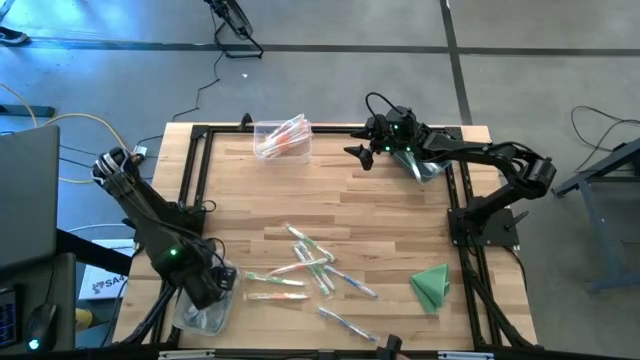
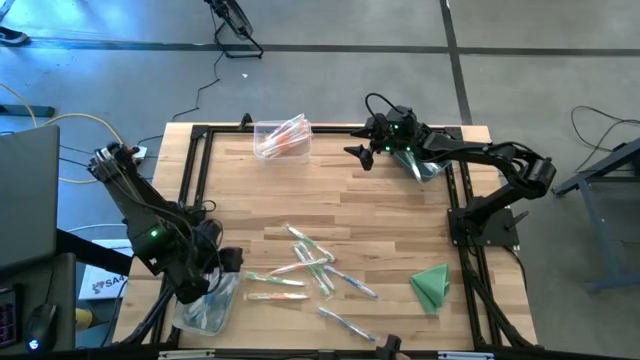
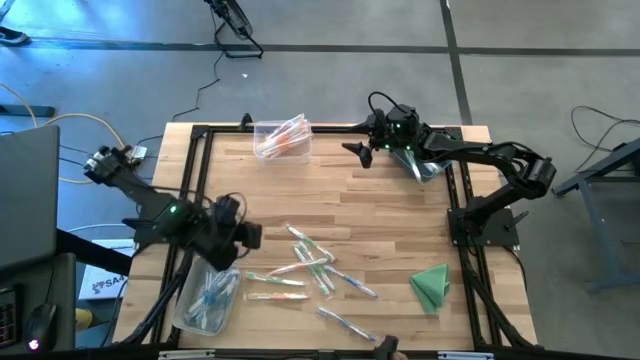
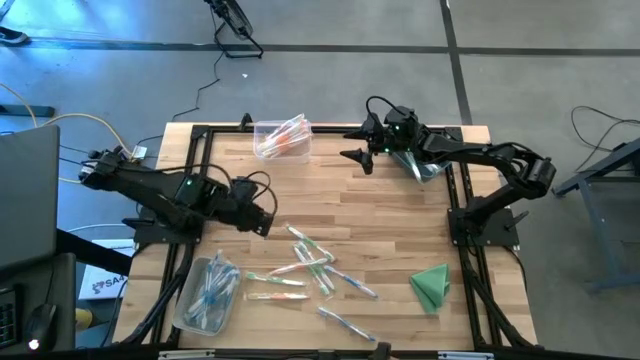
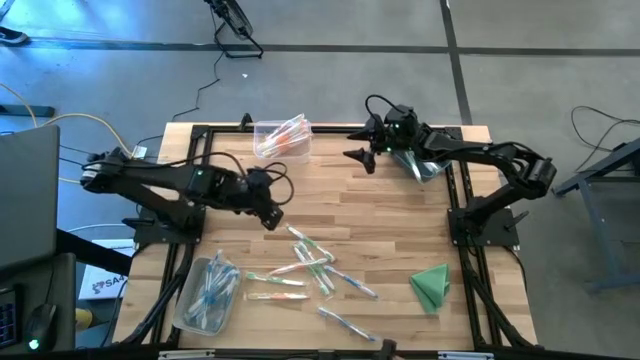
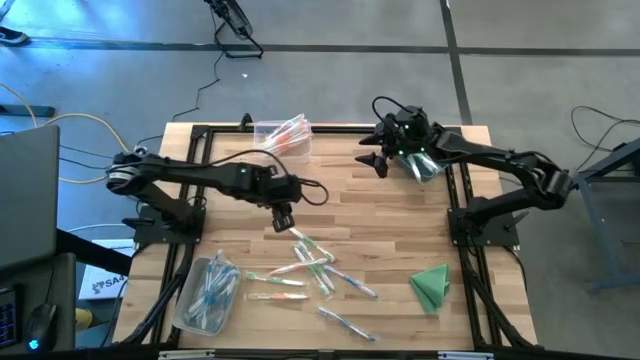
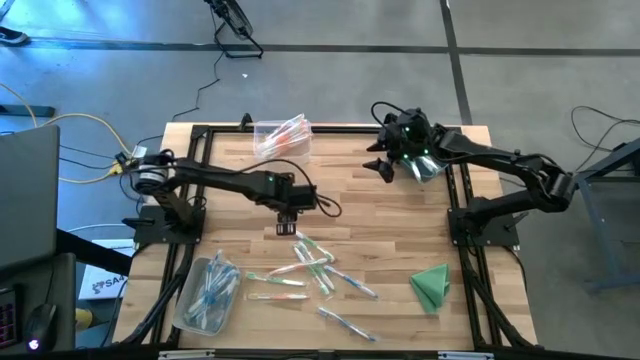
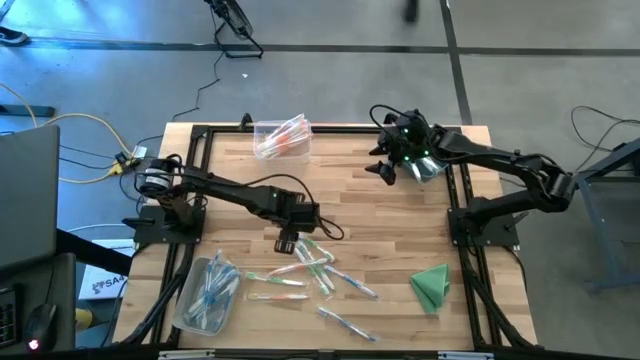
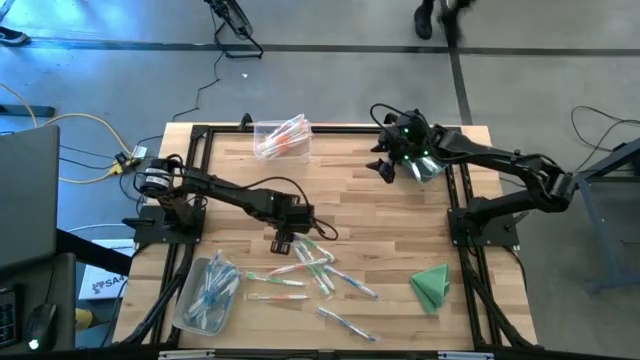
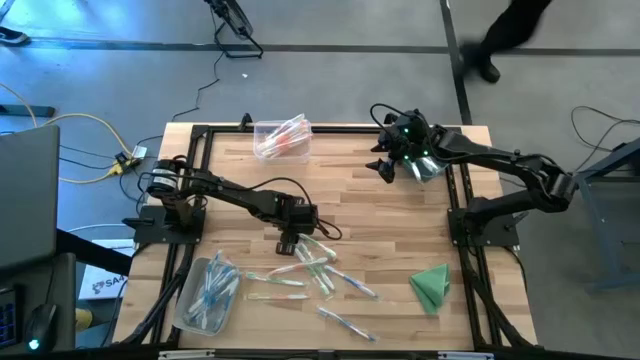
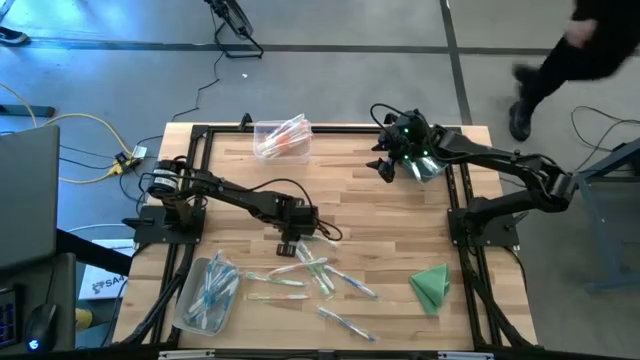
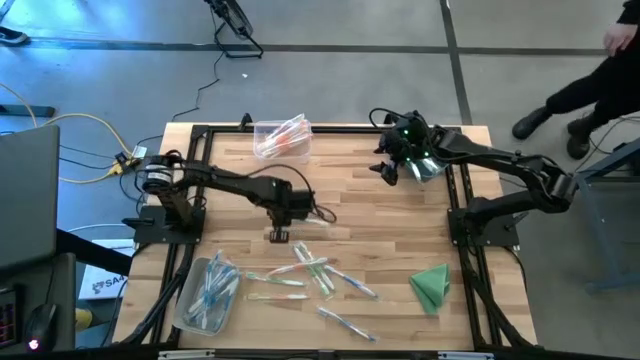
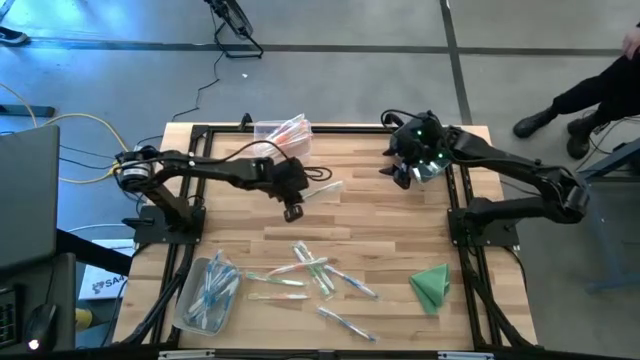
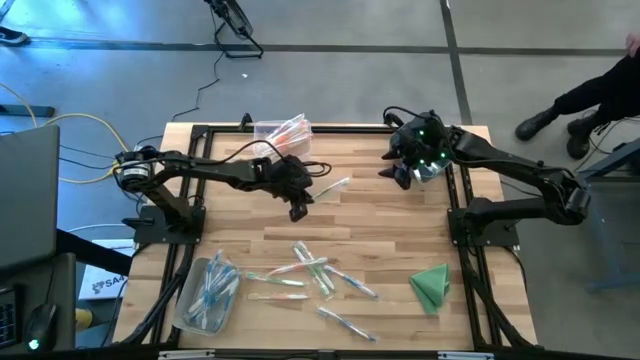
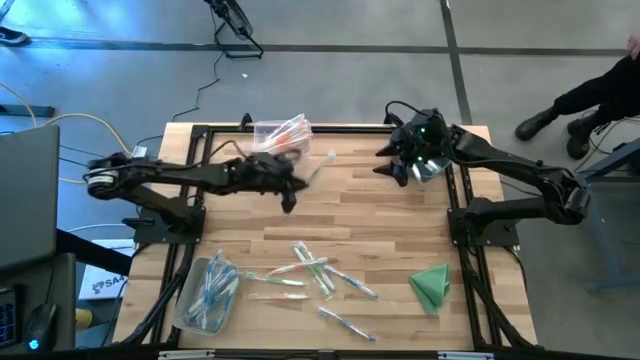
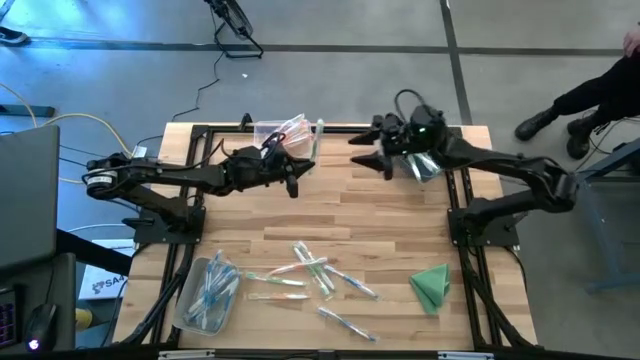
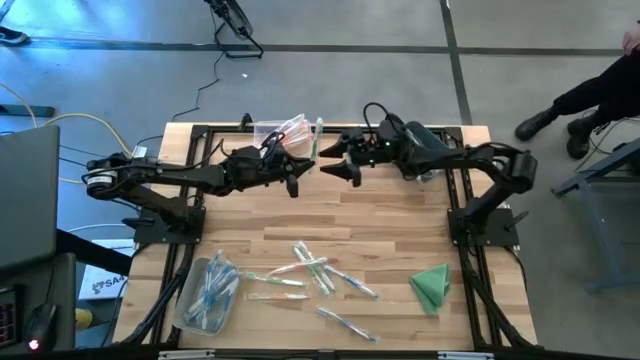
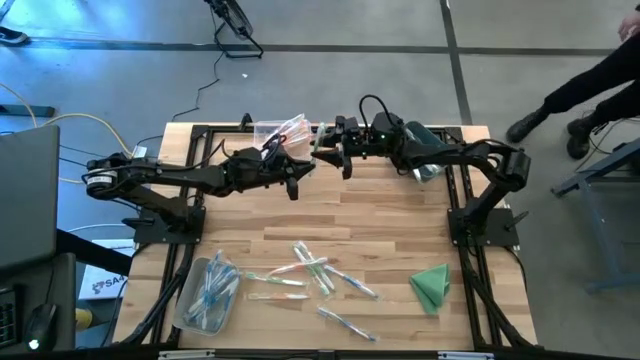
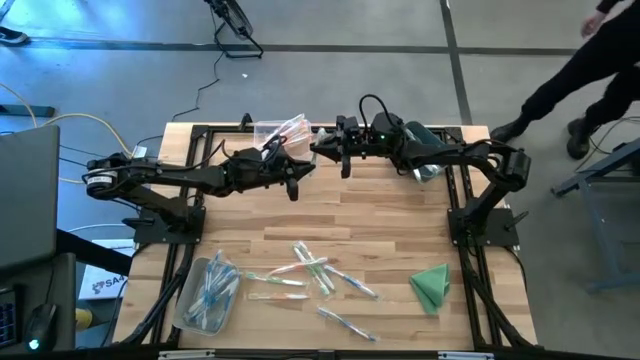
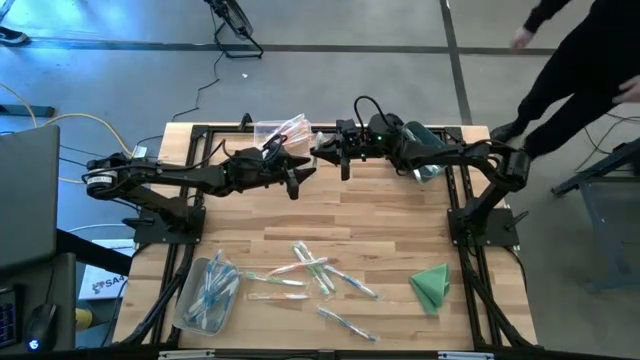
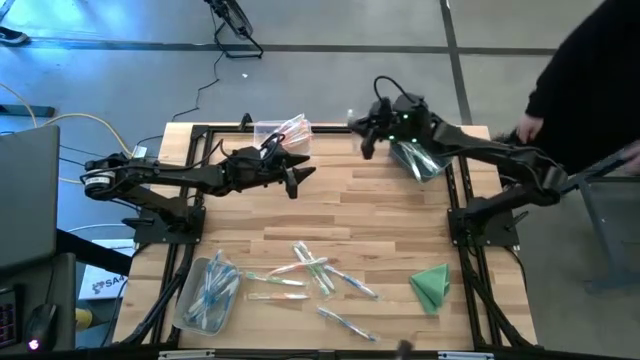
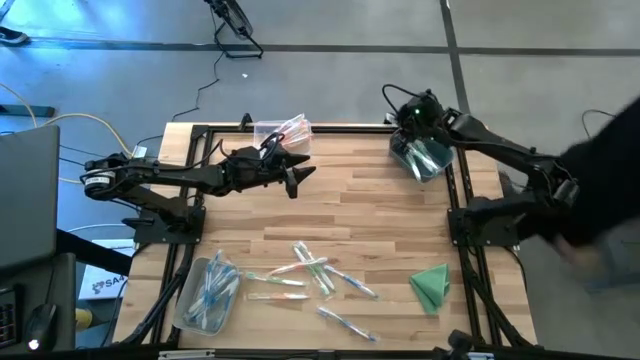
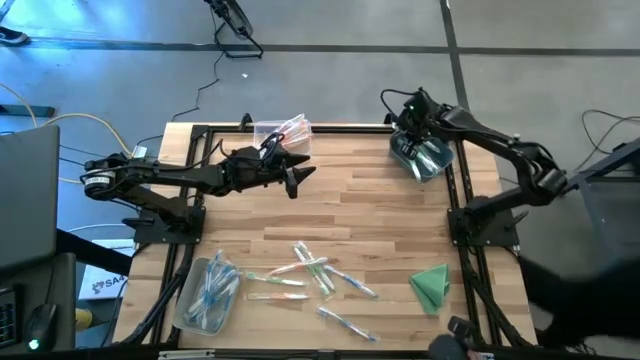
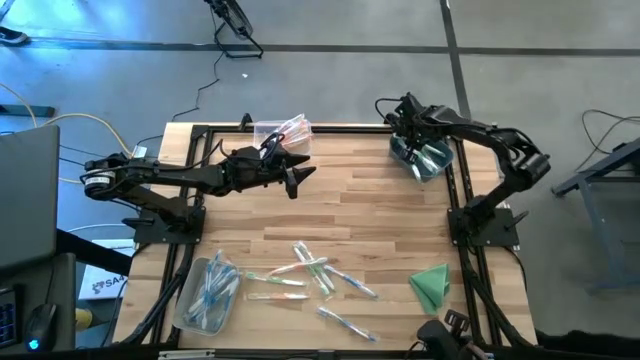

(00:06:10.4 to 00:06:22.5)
Task: Pick & Place Toothbrushes
Put the green toothbrush into the blue bin

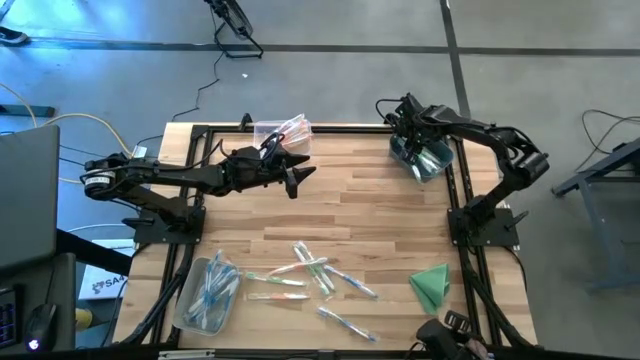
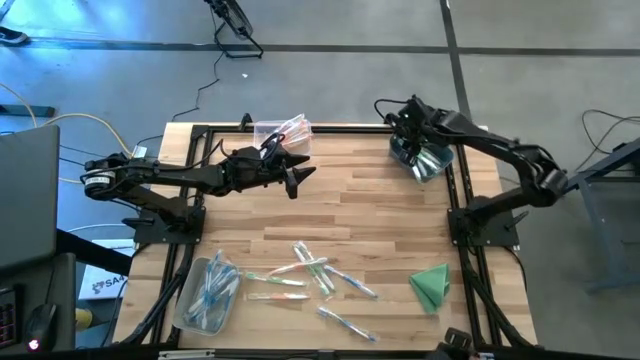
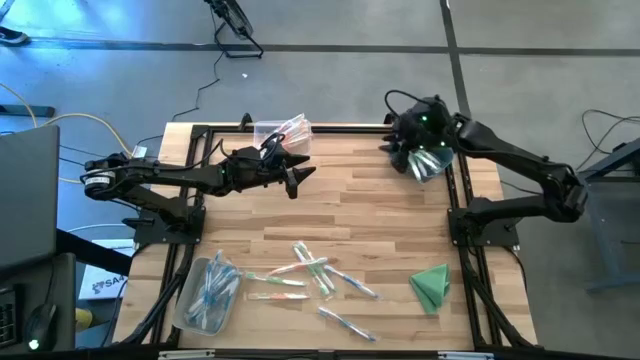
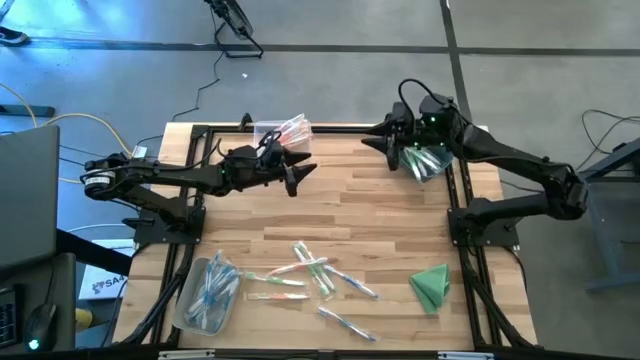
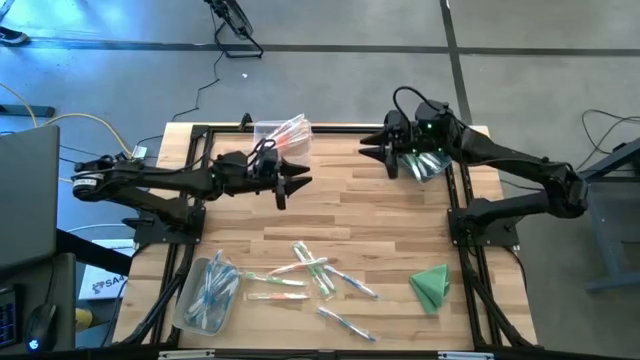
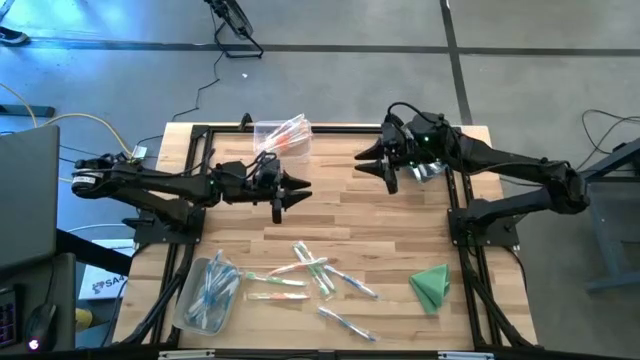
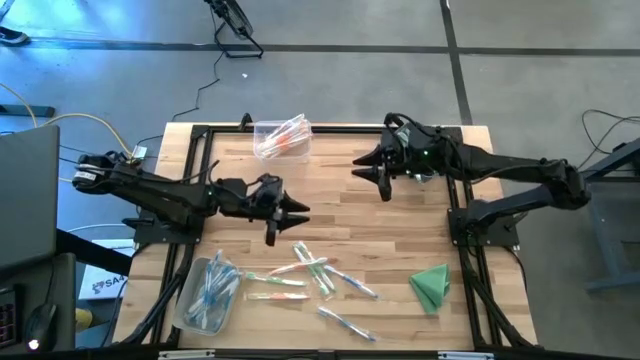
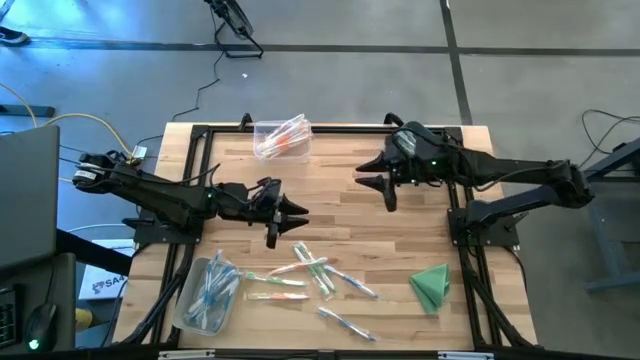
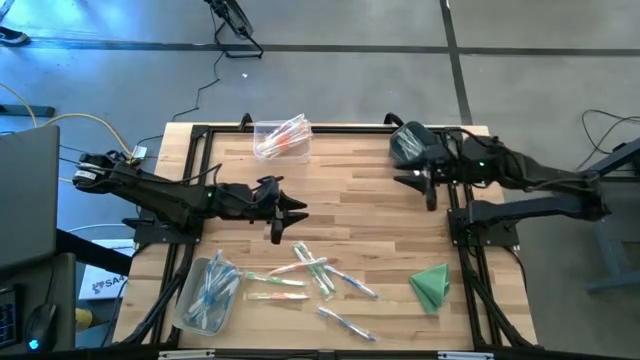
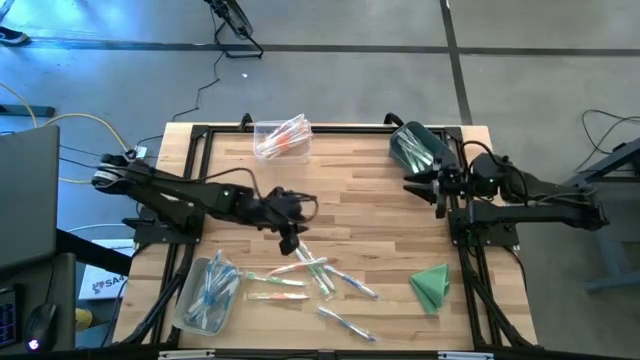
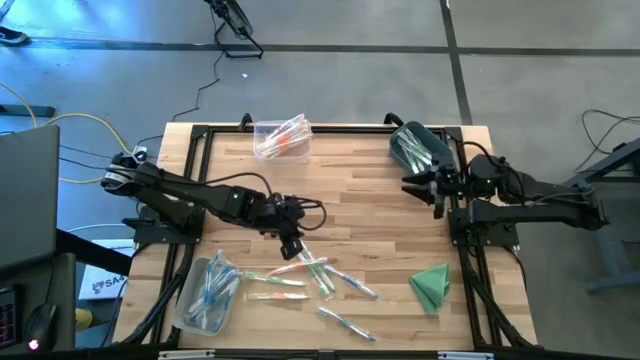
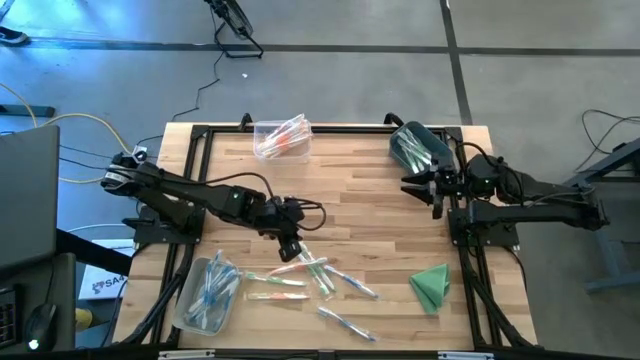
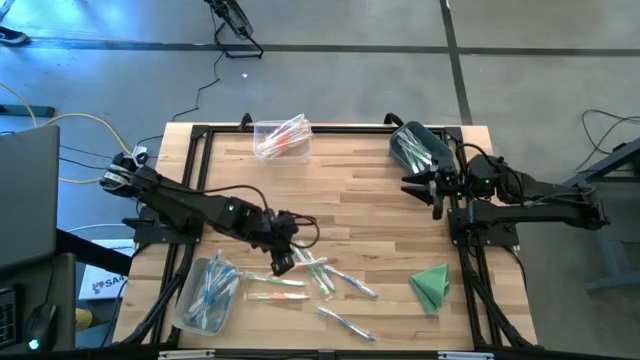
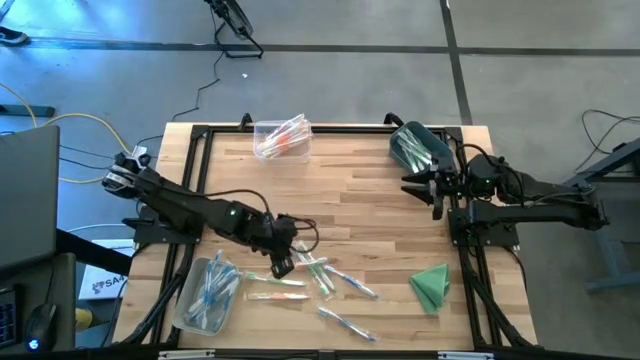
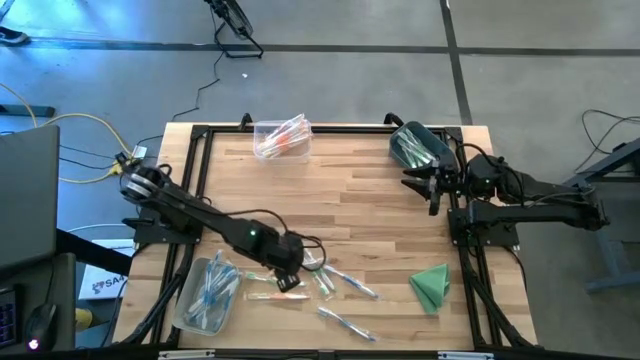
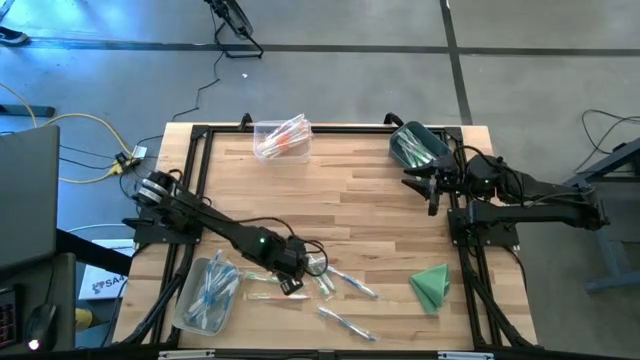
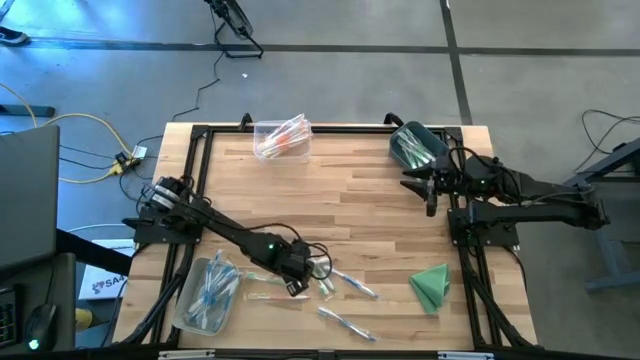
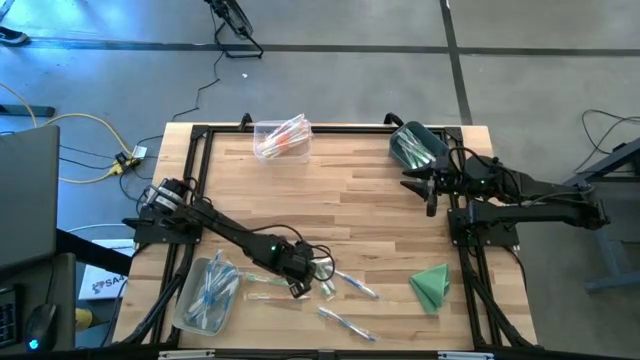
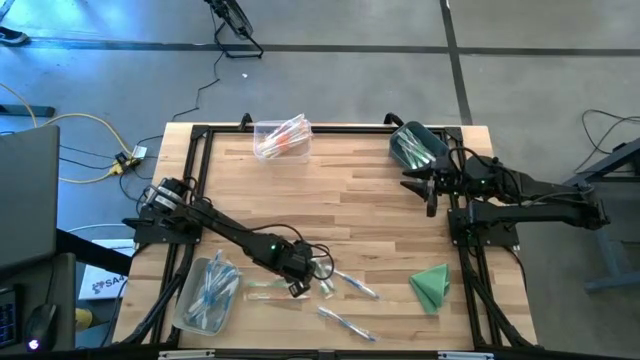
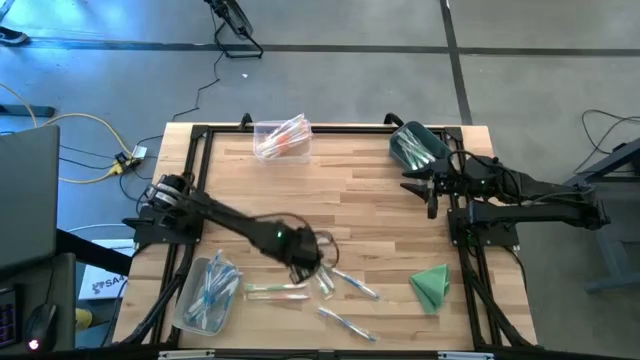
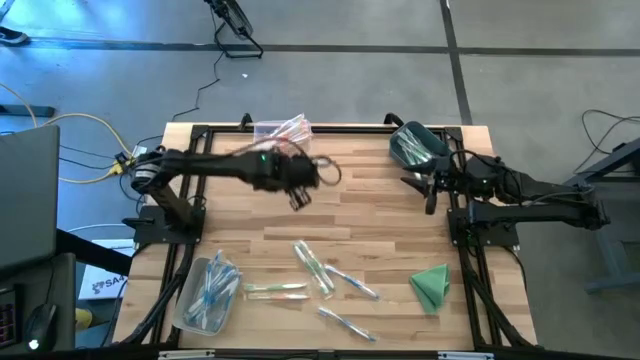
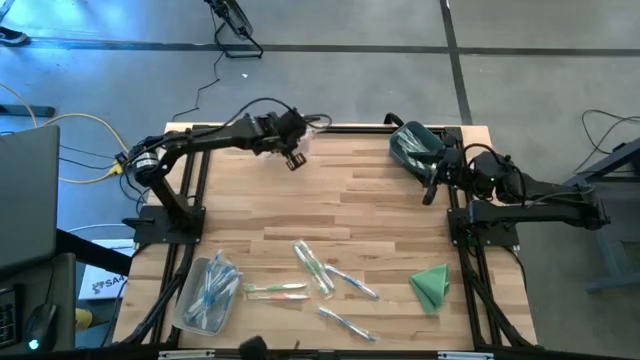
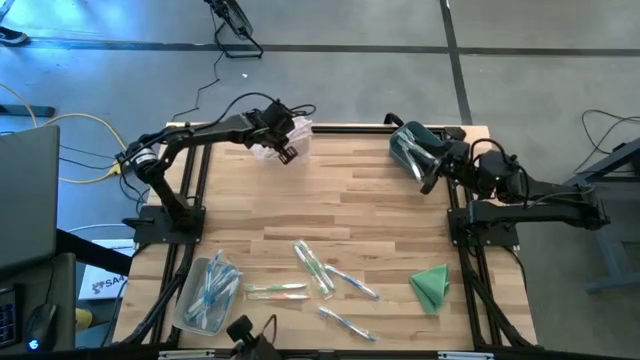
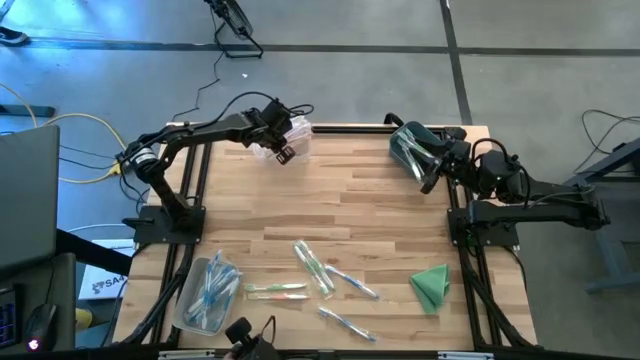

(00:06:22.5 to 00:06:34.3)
Put the top orange toothbrush into the transparent bin
